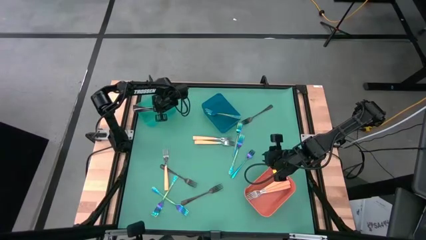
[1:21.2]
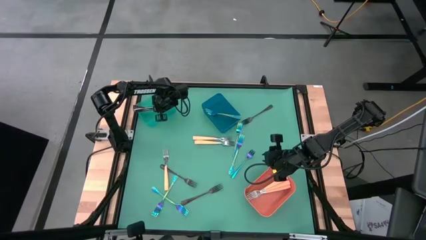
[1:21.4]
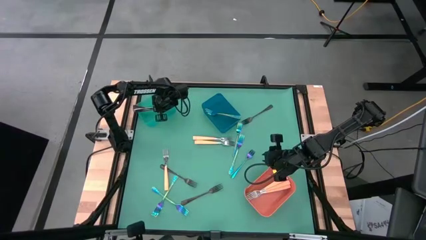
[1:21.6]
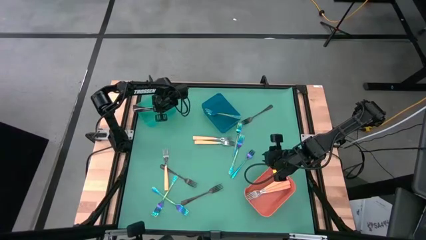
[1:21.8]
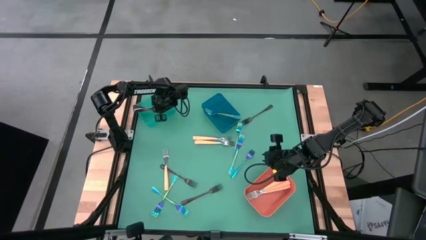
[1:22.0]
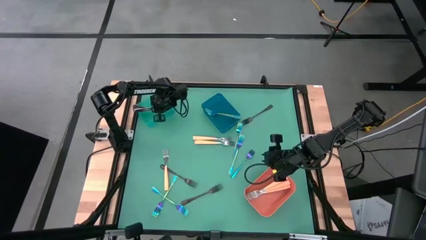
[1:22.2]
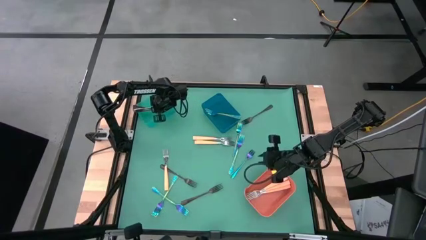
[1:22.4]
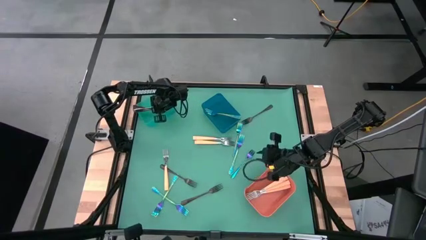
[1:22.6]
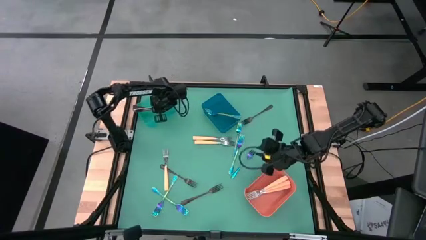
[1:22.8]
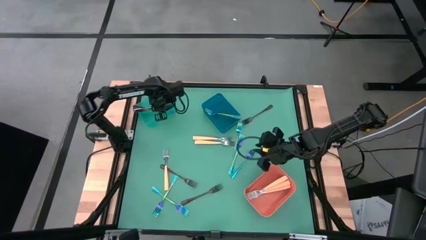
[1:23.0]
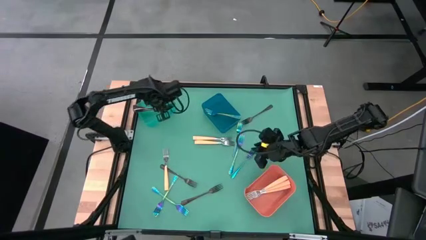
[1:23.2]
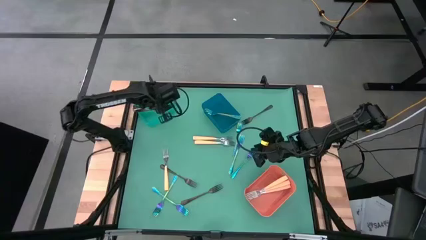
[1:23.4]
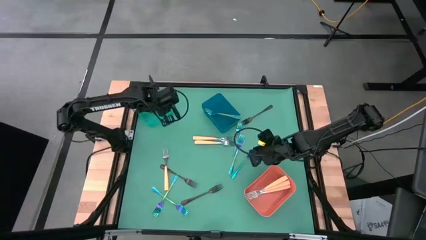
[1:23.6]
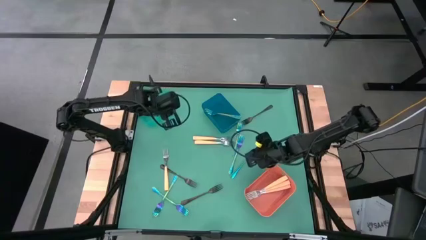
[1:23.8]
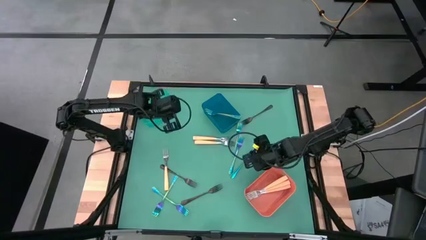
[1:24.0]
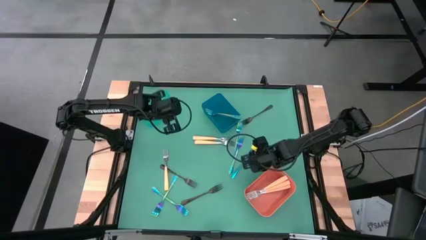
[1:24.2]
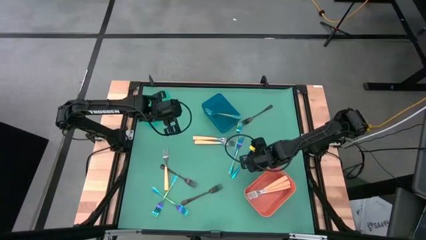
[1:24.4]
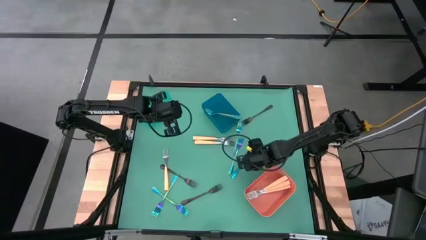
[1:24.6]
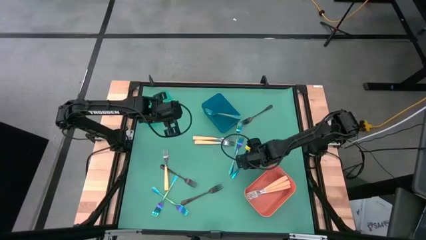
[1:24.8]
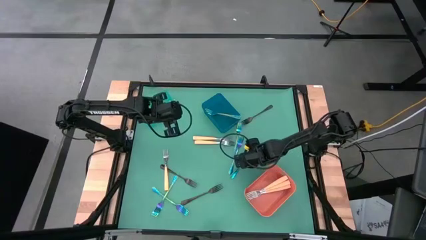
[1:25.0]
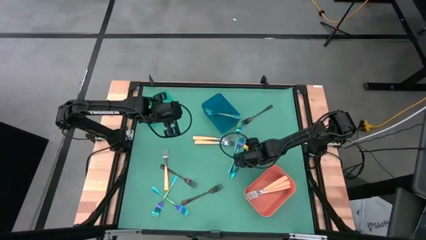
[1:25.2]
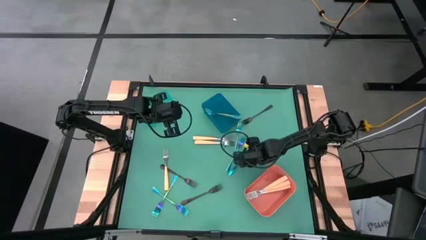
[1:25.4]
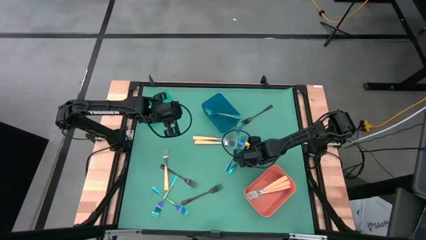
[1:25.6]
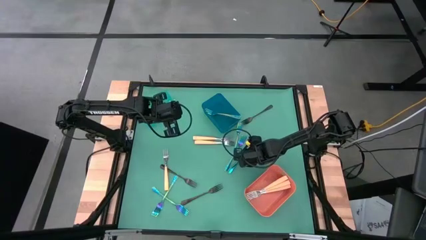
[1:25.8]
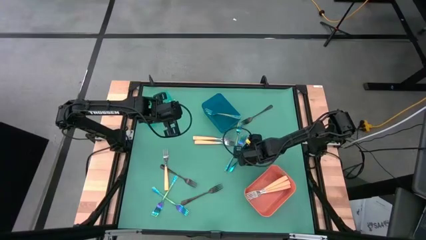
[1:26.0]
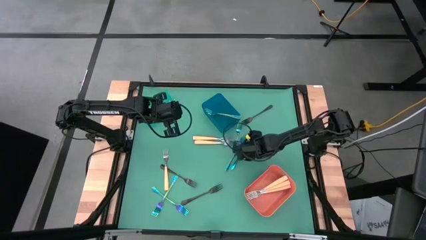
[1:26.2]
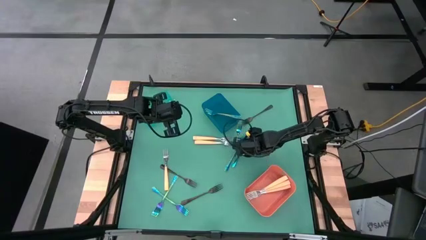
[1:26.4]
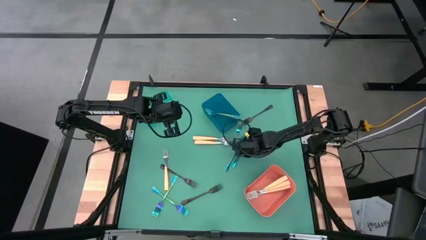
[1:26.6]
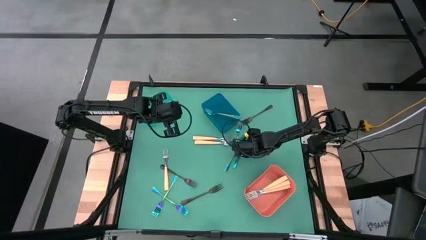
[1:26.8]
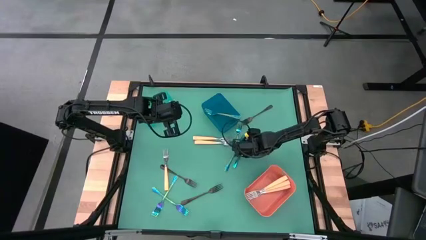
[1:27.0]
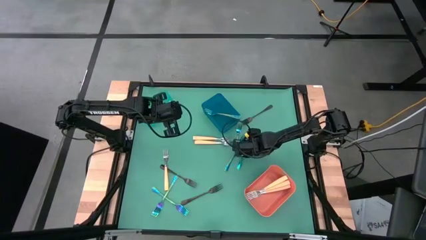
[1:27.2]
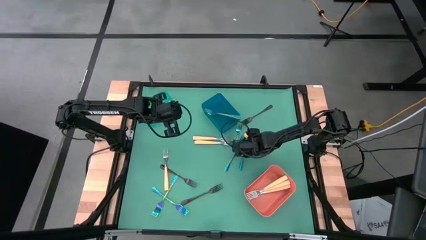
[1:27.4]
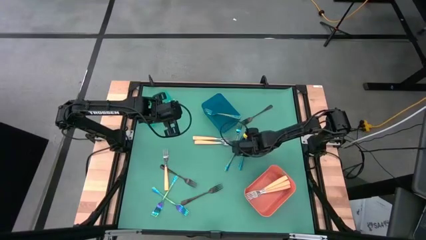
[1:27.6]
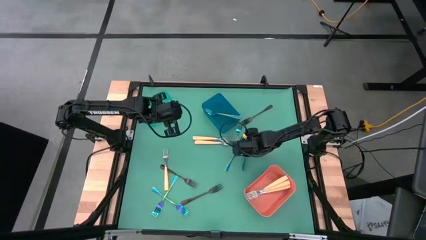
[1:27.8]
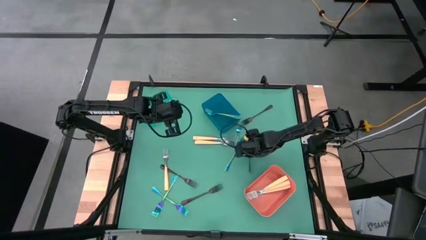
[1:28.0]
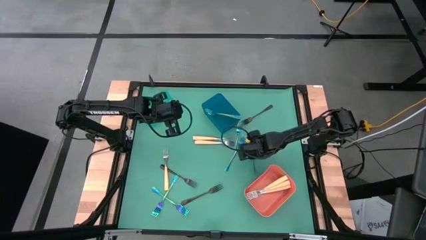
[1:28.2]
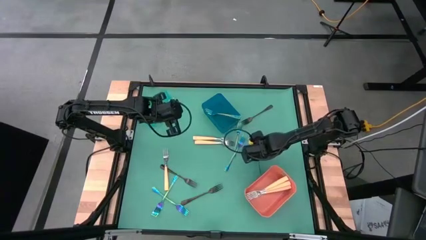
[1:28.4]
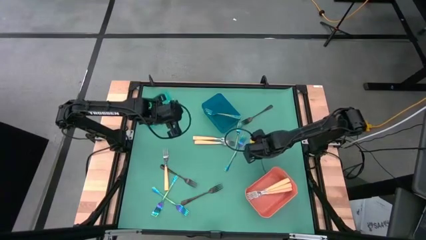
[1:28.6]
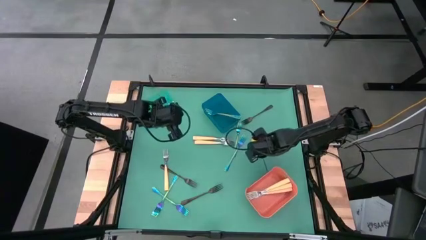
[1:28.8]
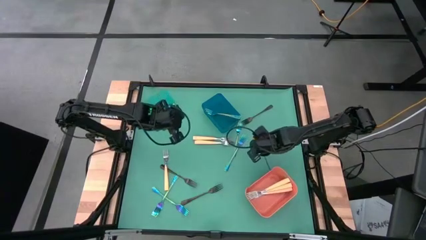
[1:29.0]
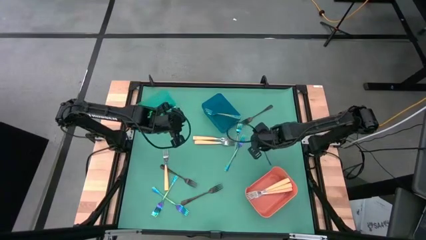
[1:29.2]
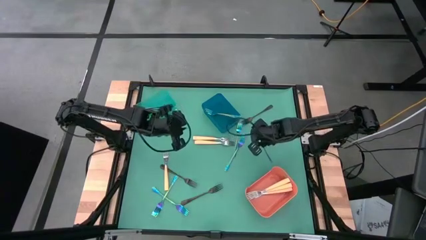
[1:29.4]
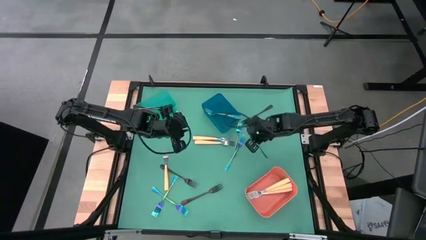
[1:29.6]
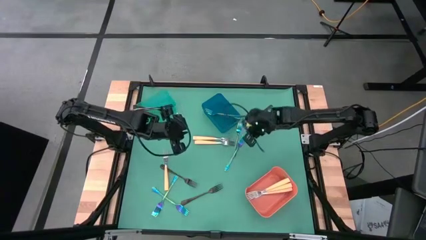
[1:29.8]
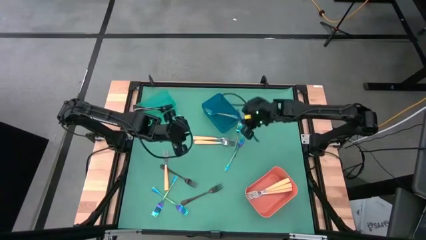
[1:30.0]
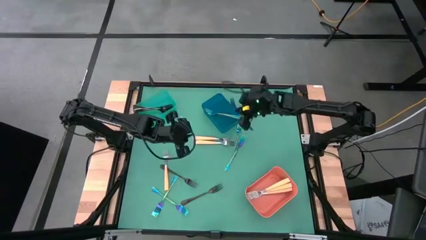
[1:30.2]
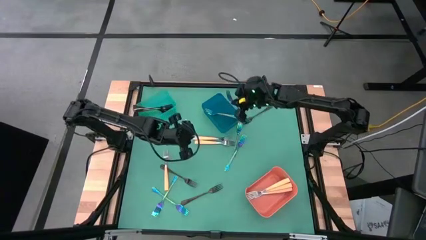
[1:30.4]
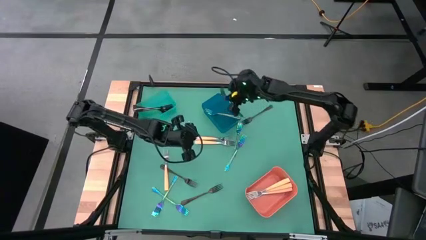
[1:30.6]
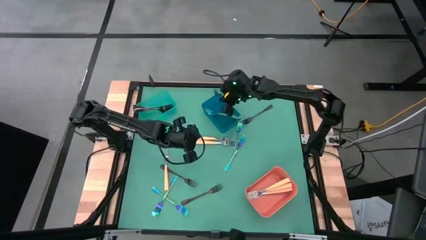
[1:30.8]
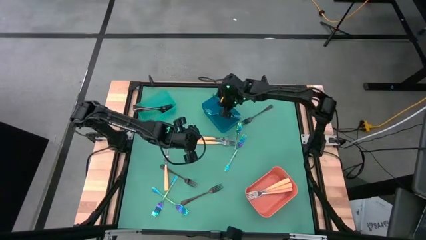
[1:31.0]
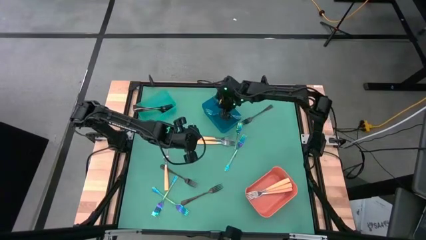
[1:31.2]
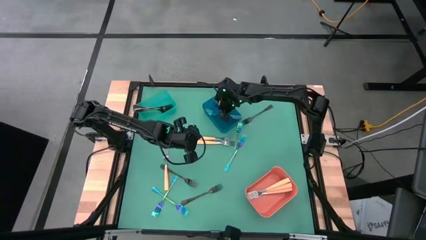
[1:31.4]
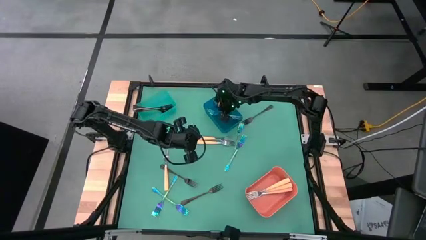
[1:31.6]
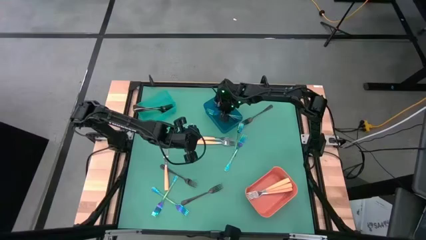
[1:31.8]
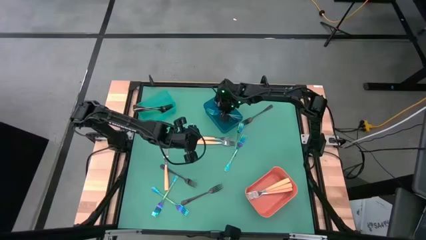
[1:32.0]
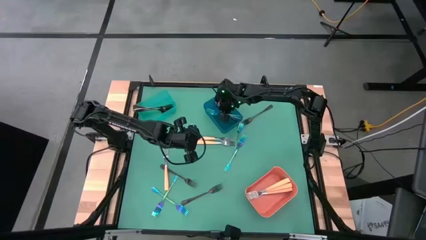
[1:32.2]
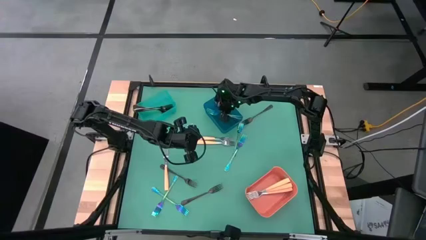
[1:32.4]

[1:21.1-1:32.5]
Task: Sort silverware by color (type)
Put the purple fork into the blue bin

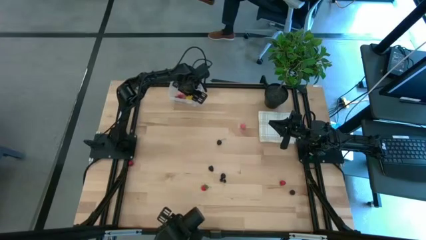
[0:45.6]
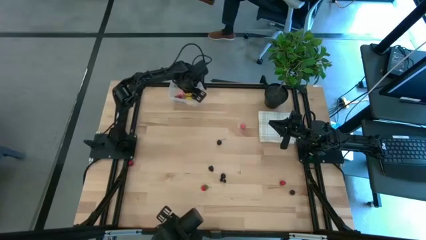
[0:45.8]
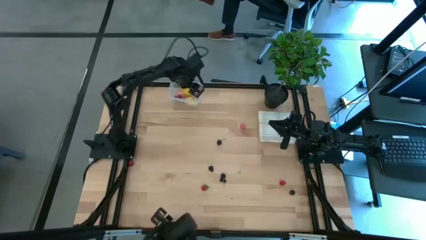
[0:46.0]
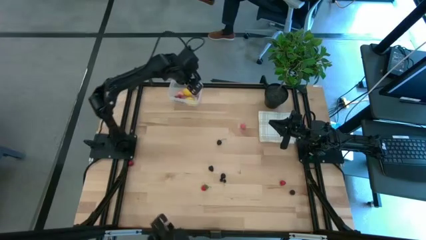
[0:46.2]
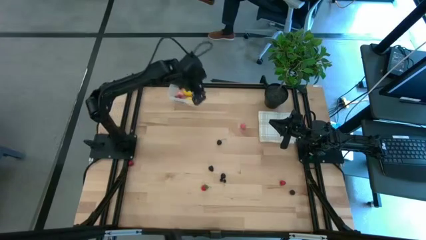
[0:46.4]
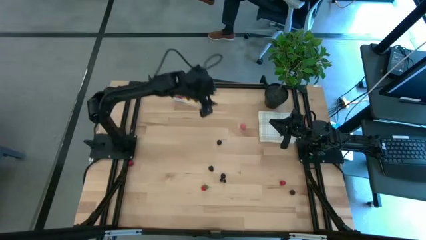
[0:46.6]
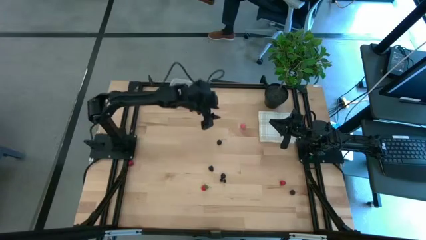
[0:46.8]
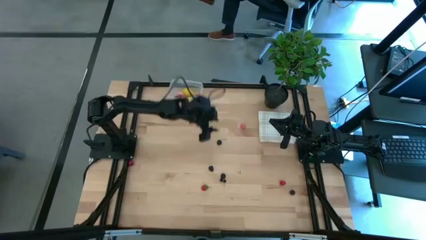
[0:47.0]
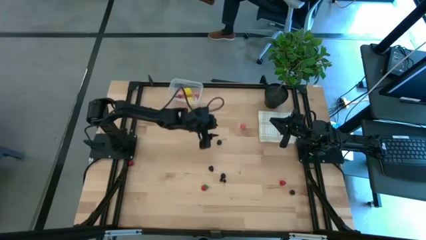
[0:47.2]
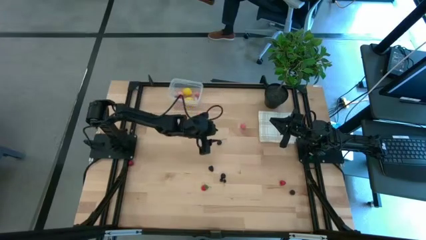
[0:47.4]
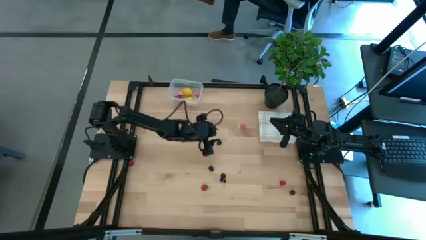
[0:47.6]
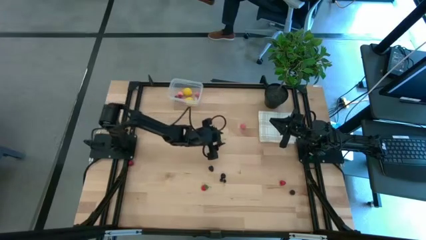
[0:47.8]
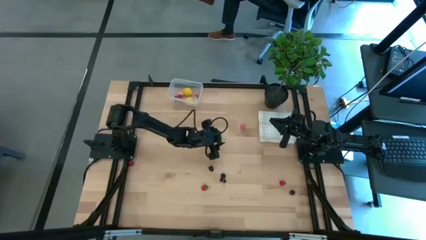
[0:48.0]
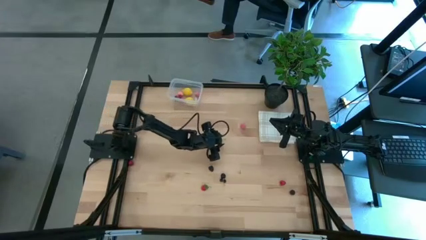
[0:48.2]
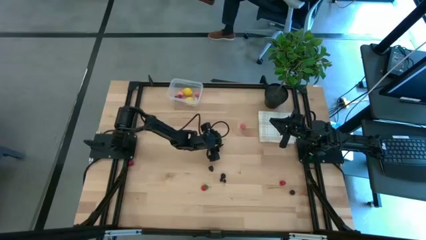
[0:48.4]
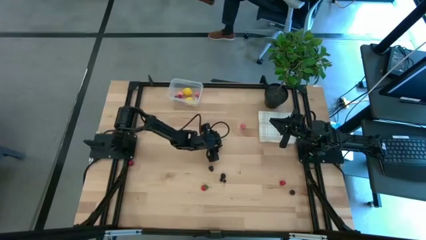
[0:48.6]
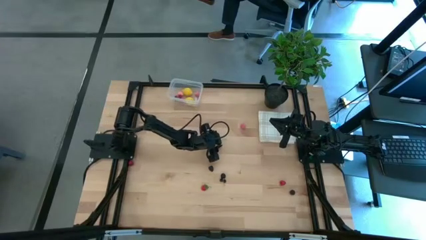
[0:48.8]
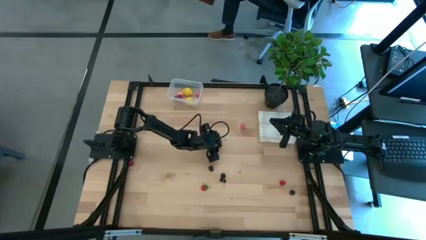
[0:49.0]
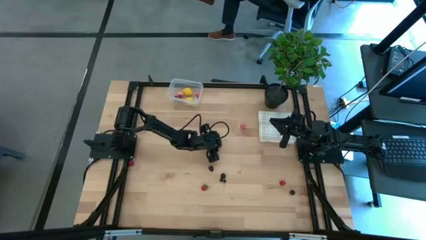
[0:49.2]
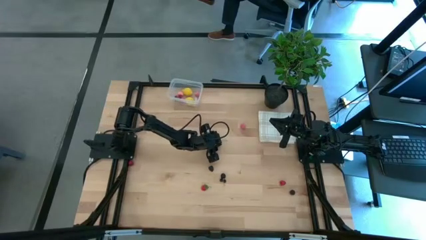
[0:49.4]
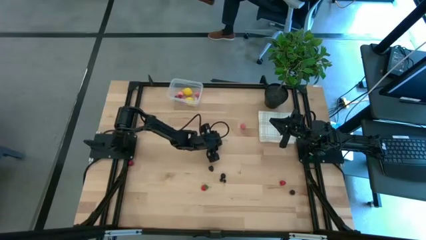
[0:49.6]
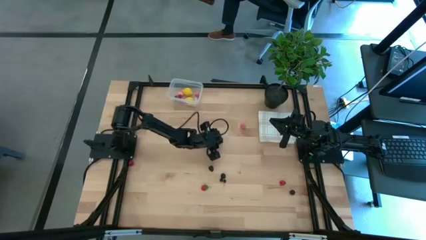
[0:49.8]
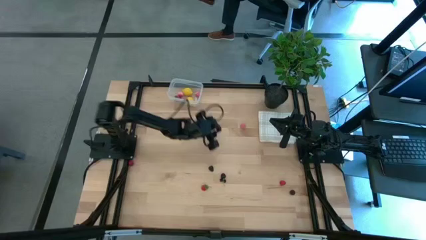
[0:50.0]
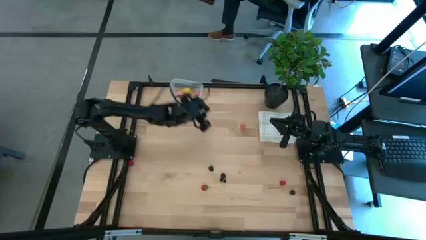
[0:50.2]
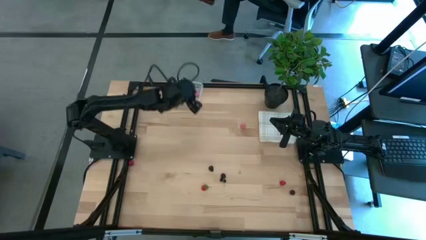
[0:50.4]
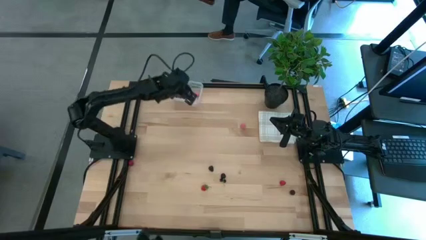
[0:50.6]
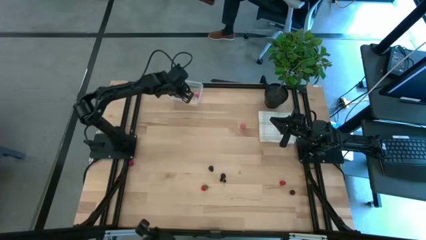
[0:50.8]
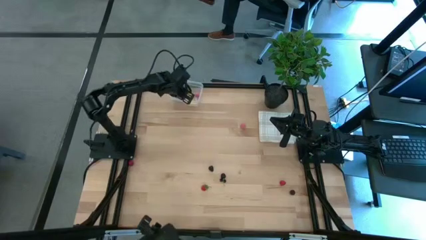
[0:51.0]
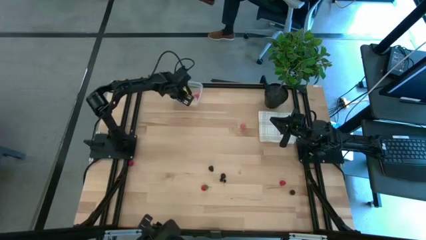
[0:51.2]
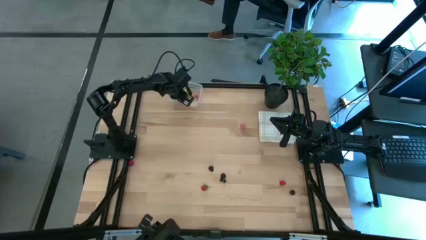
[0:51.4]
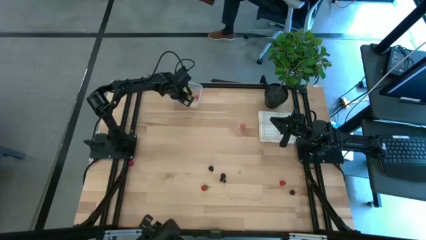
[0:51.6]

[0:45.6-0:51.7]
Task: Pick and placing Produce into tupperware
Put the top black cherry into the transparent bin
